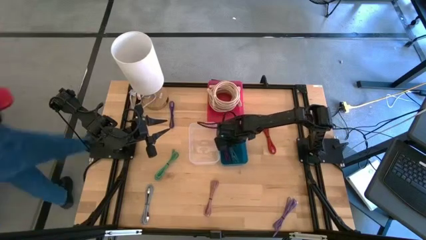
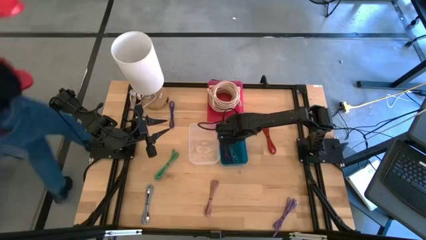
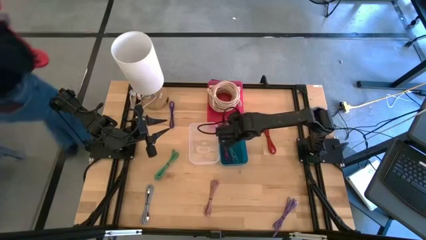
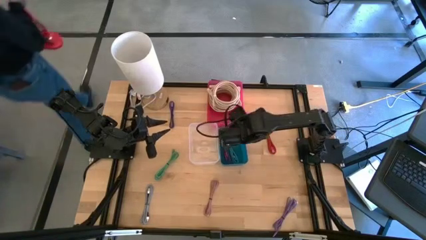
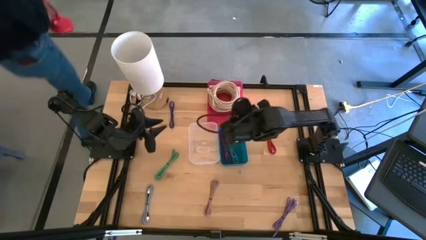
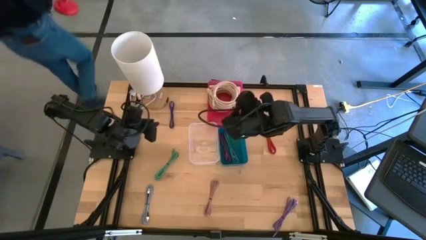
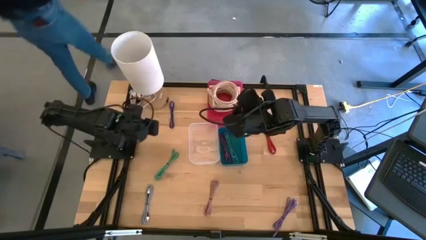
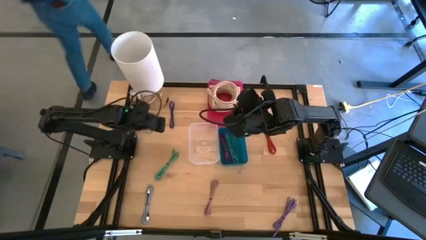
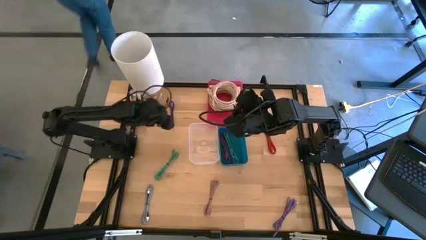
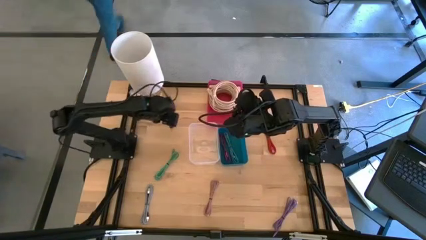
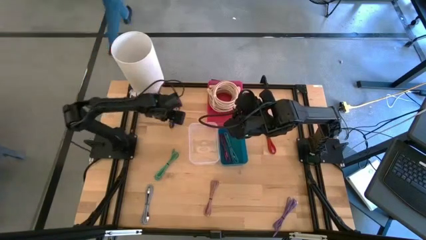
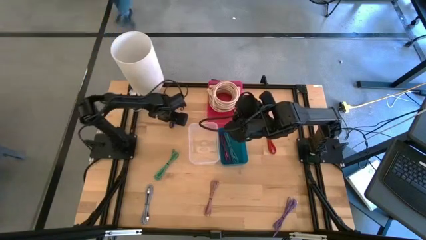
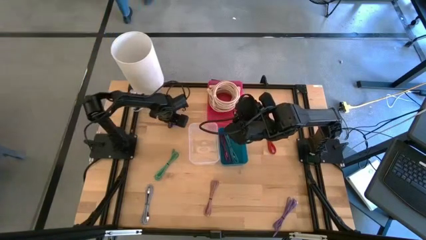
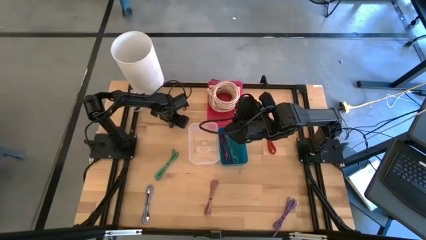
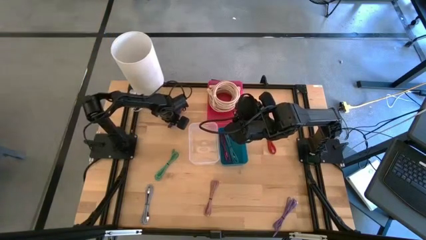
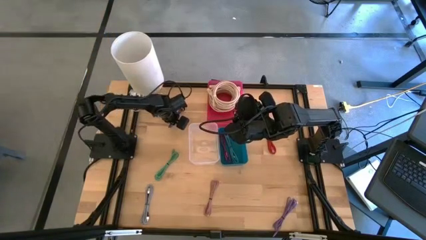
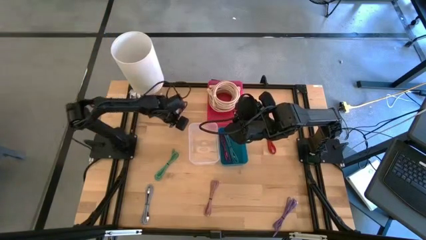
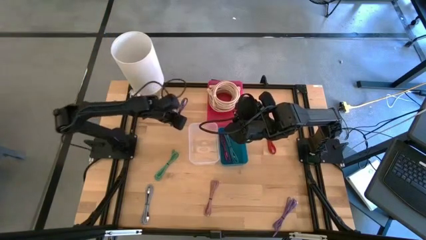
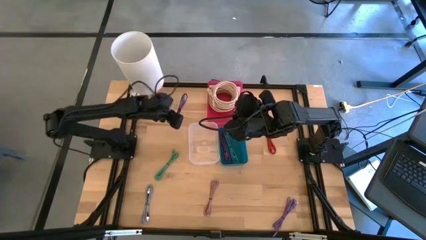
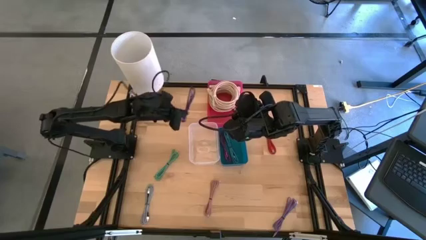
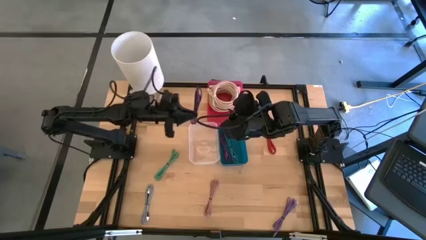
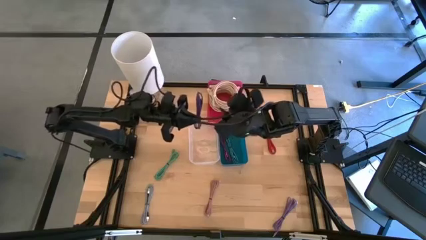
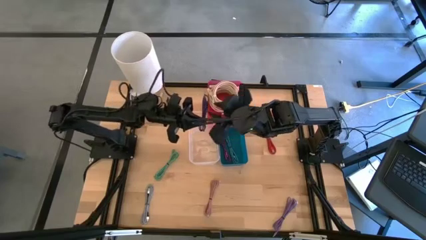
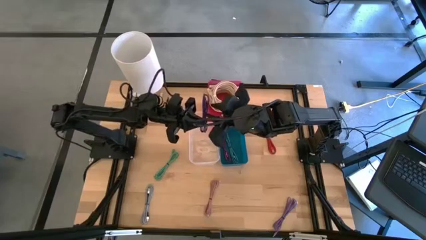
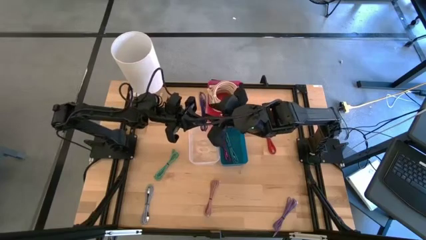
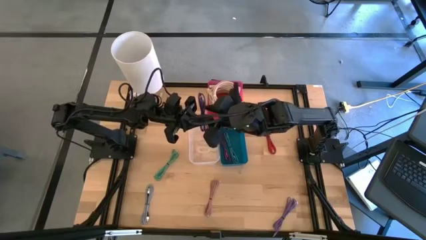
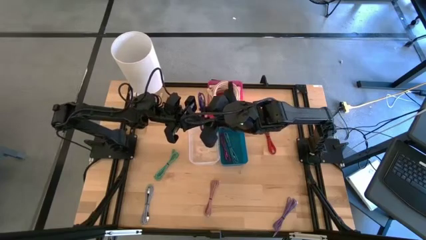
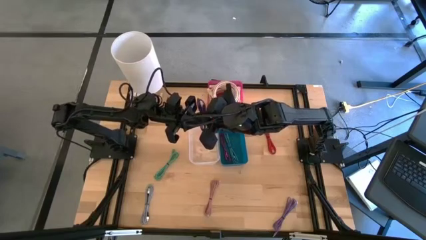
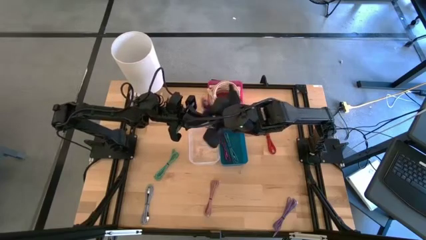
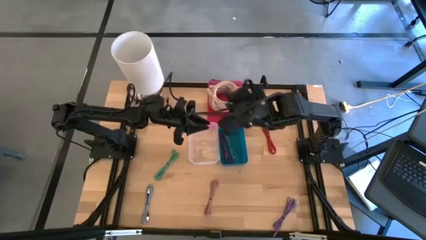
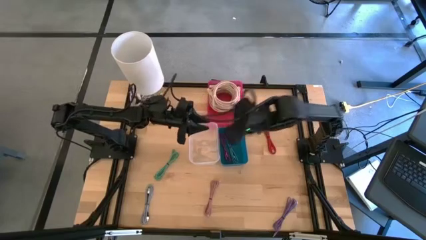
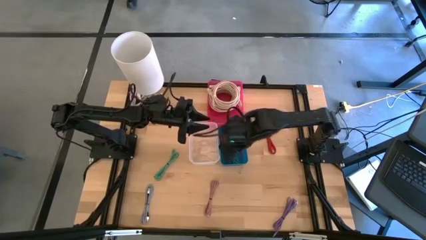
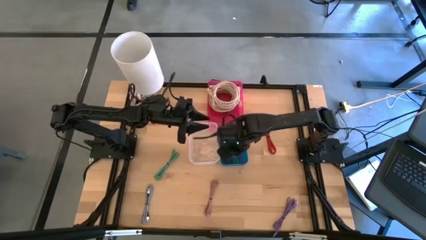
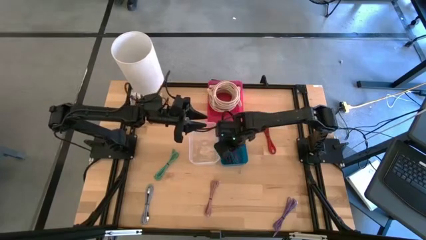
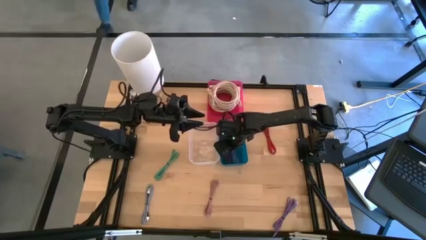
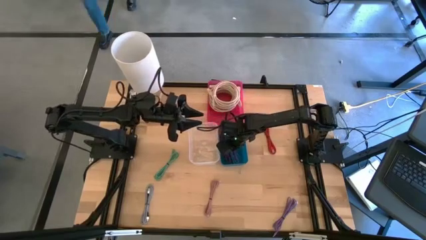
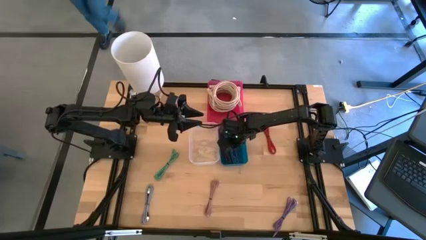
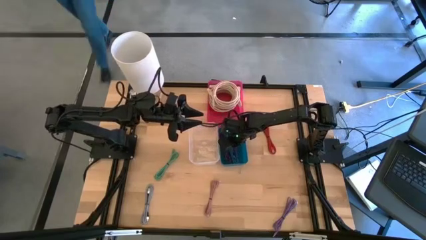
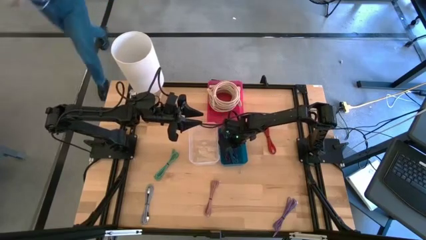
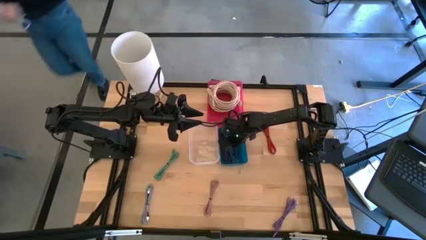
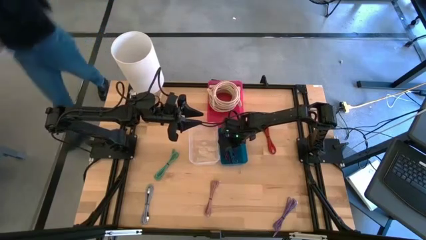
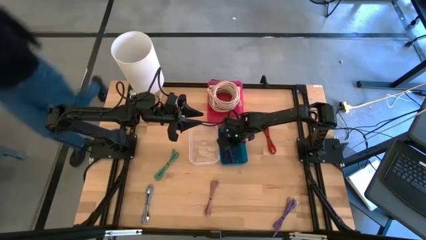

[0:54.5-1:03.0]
Task: Pick & Place USB Port
Put the purple patterned charger cable into the blue bin

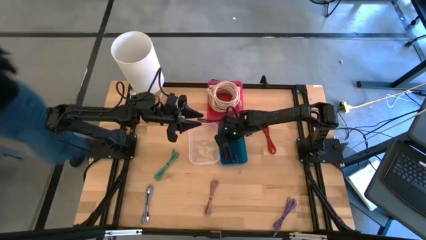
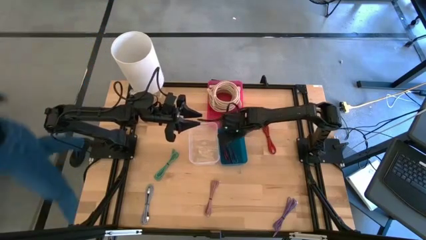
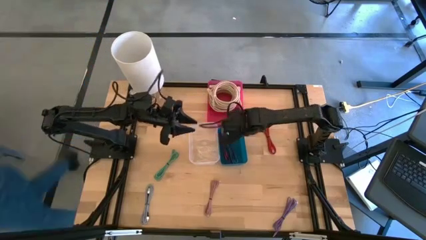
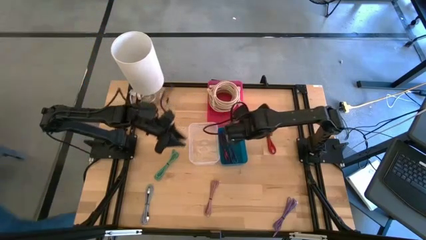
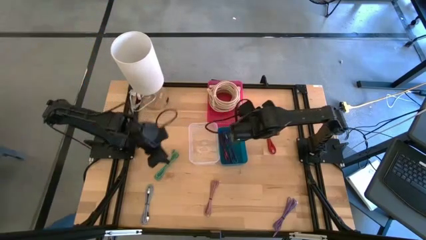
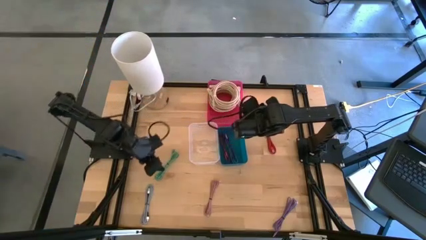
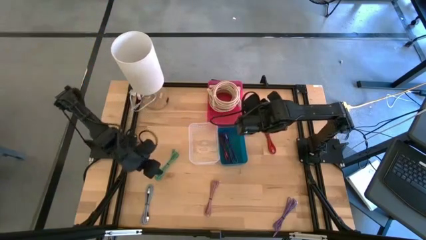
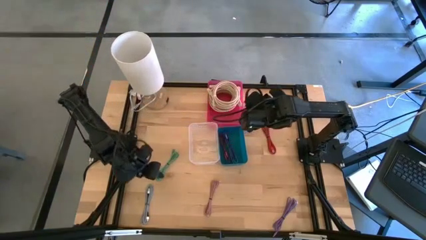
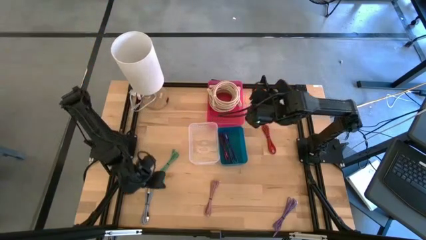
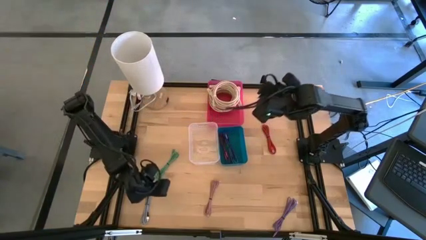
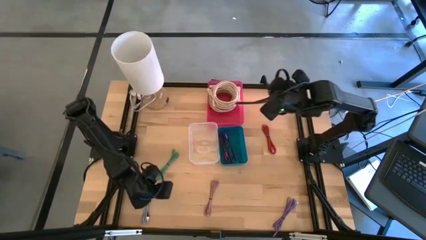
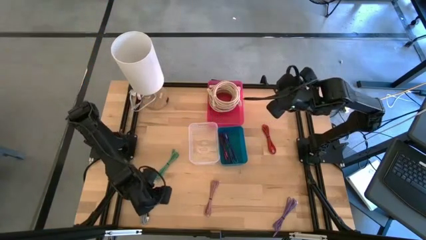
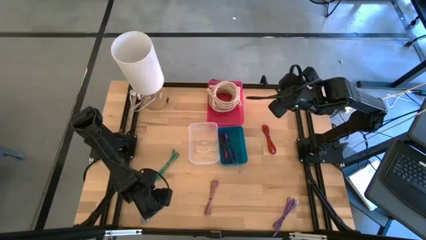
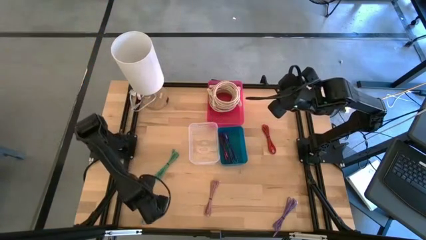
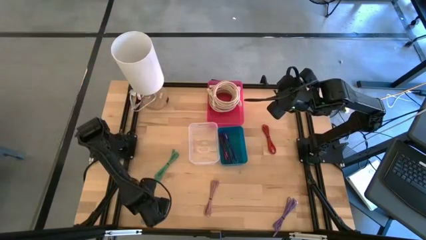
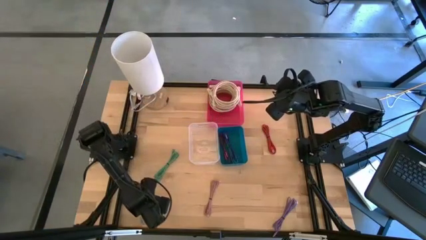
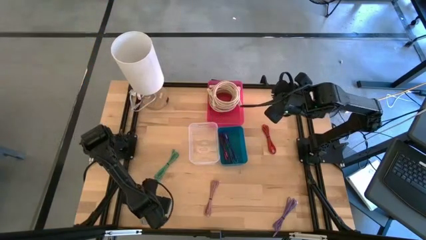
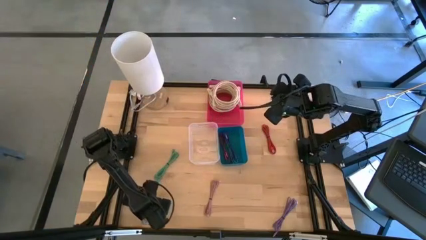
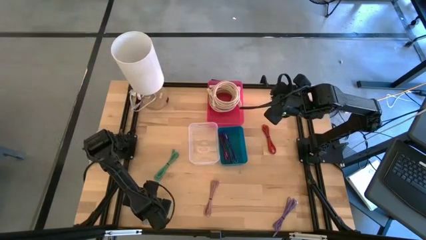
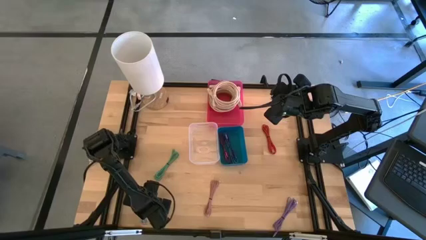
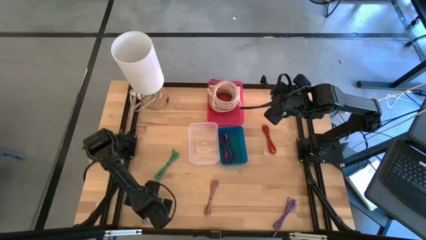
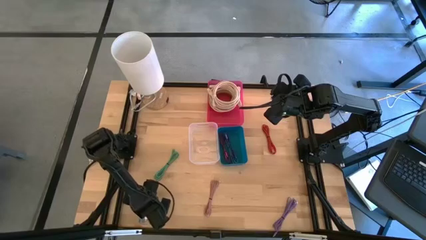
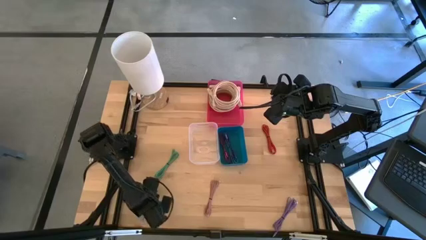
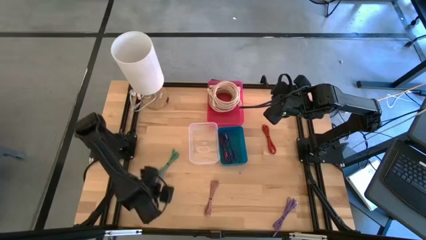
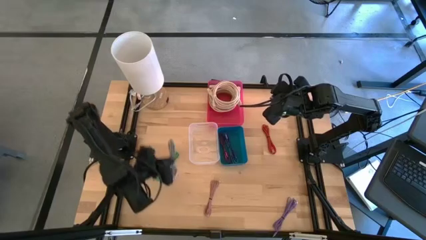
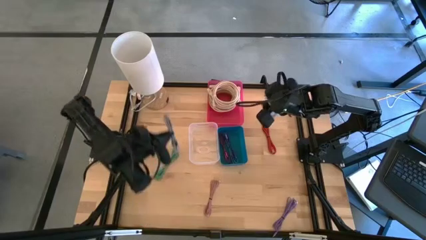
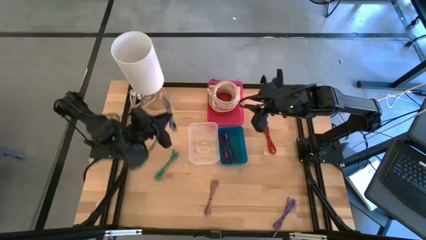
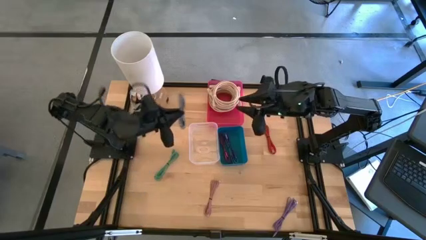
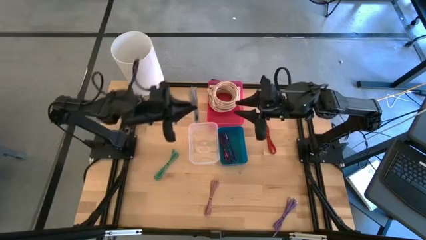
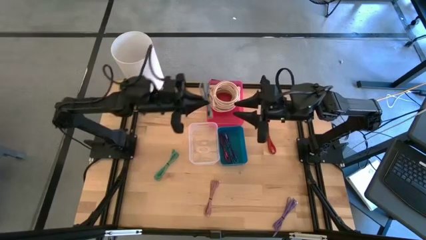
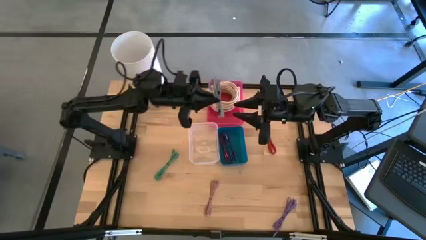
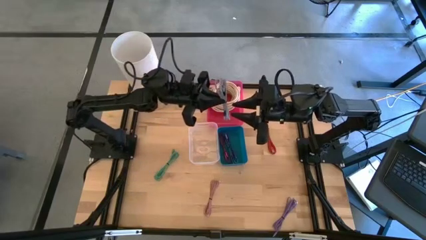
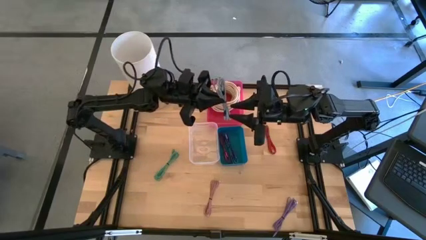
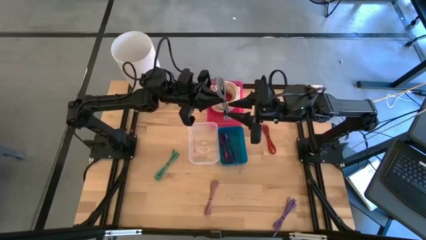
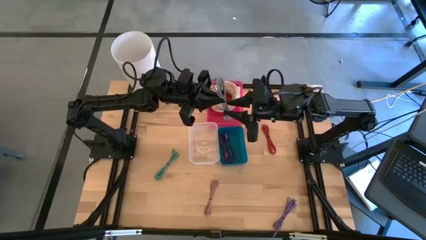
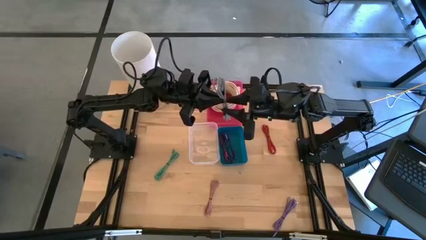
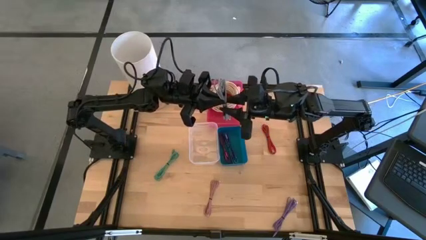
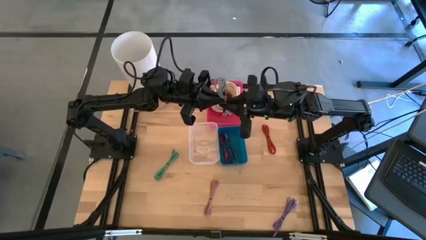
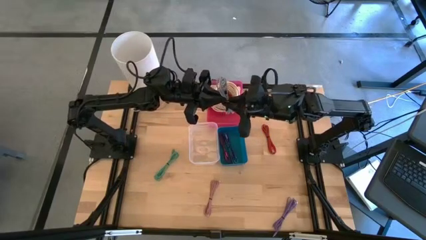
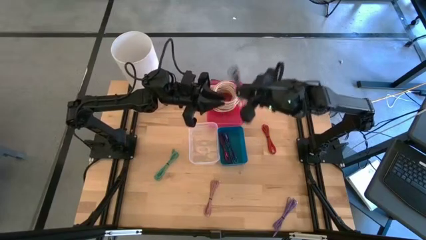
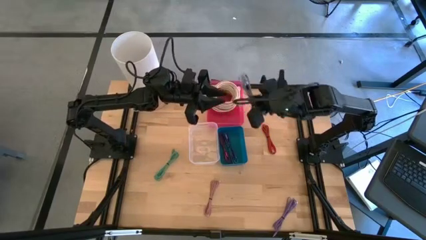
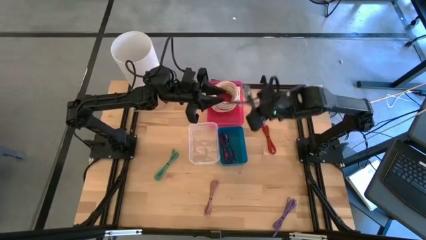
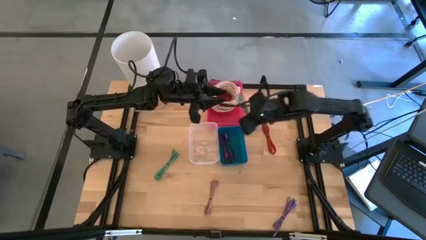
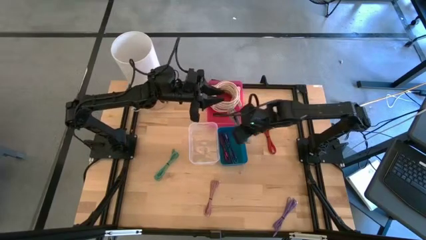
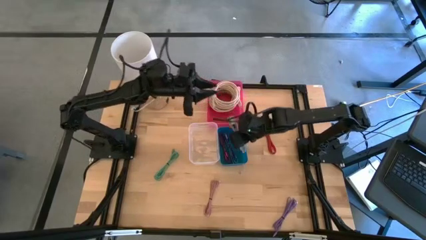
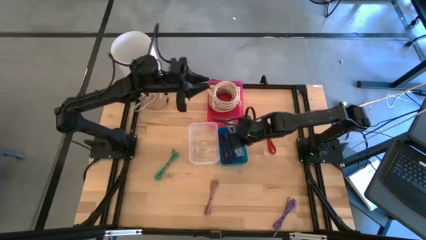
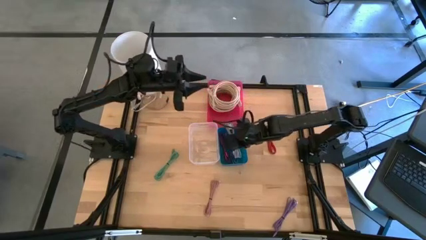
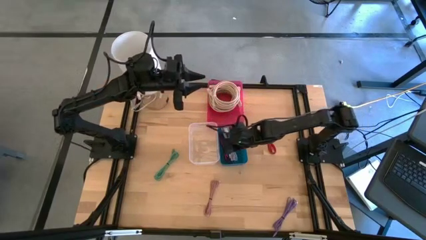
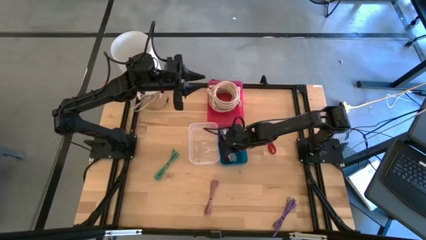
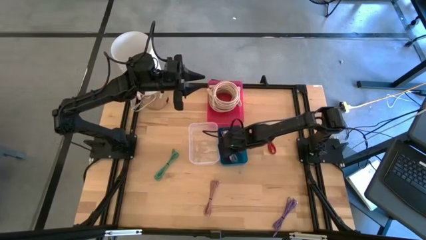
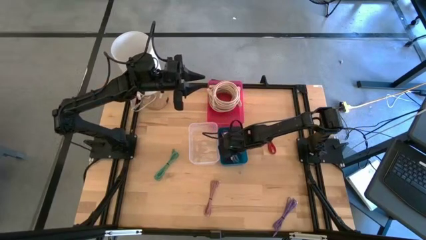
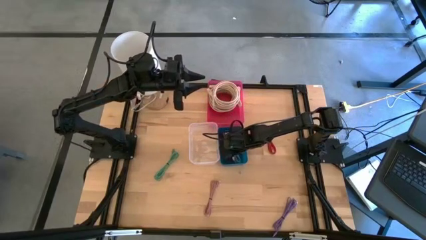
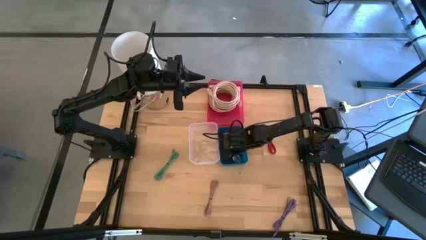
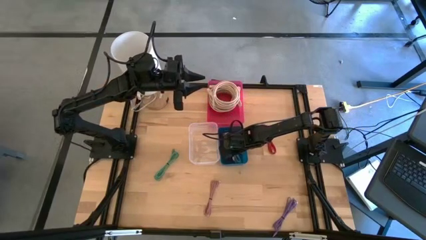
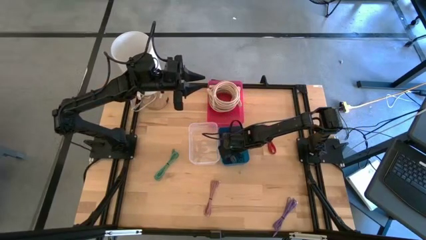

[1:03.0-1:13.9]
Put the white patterned charger cable into the blue bin
